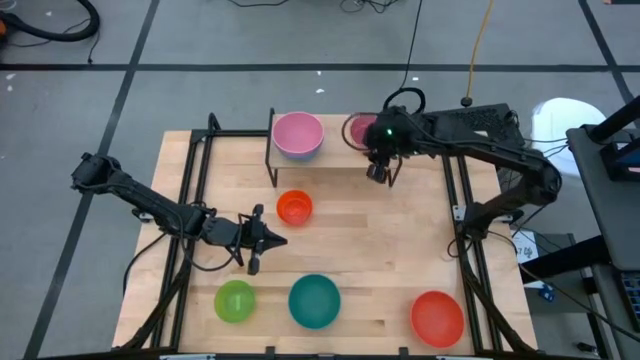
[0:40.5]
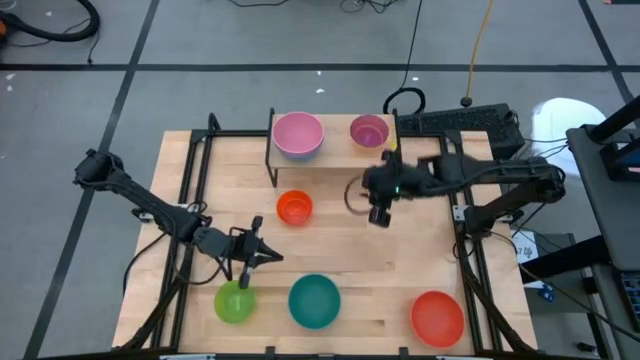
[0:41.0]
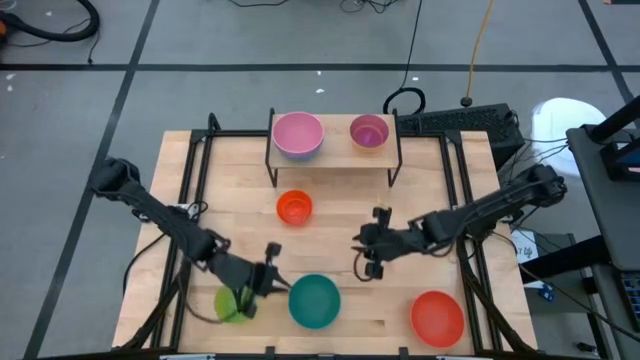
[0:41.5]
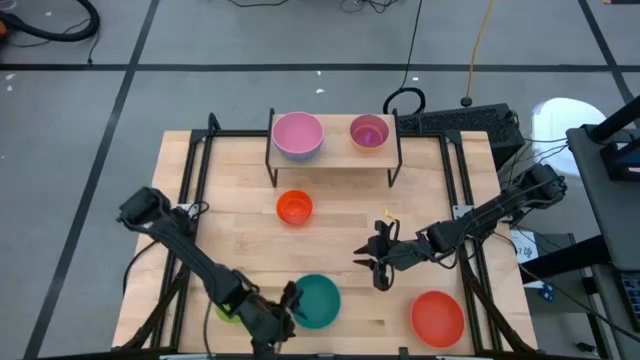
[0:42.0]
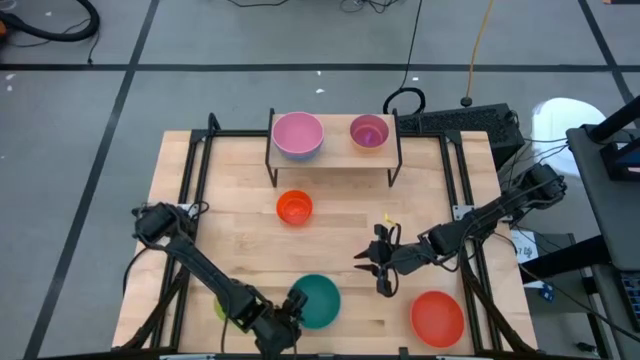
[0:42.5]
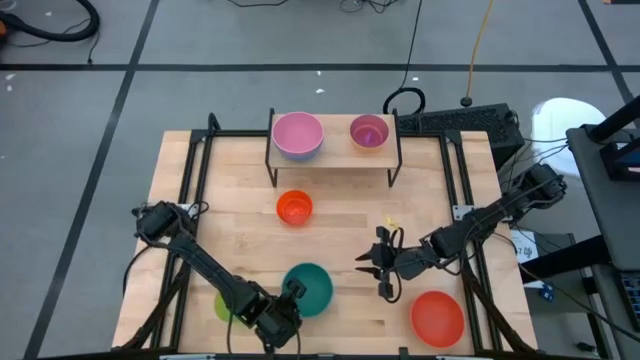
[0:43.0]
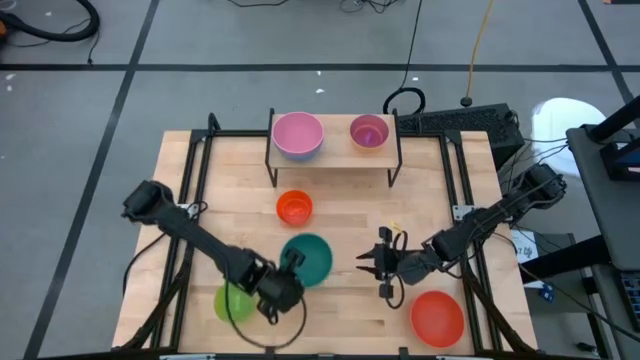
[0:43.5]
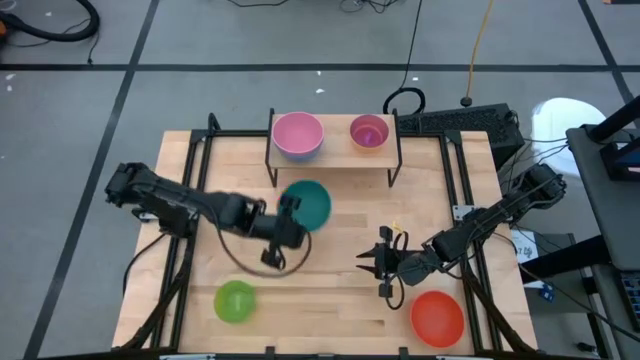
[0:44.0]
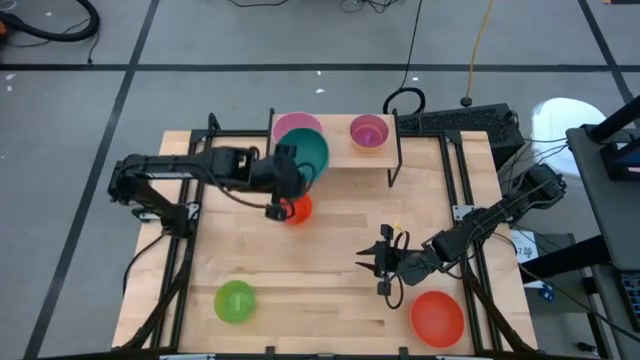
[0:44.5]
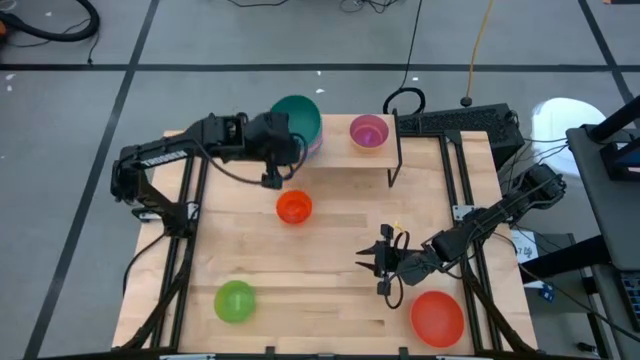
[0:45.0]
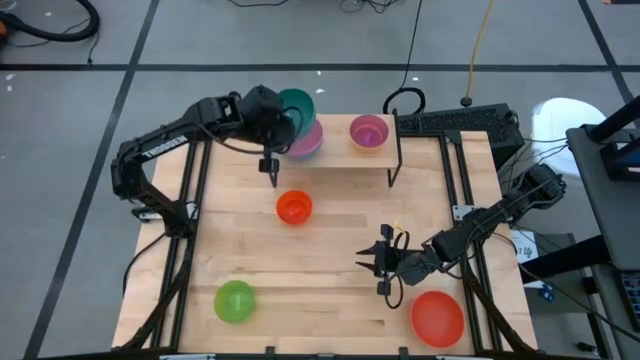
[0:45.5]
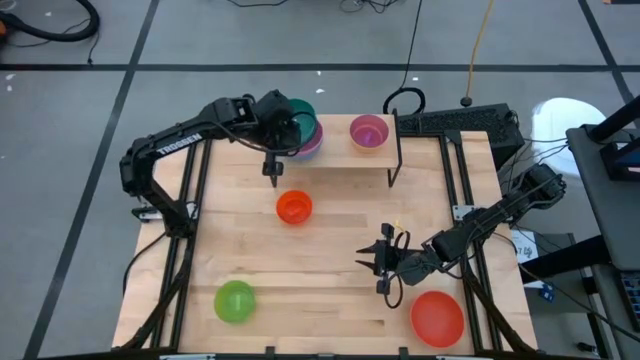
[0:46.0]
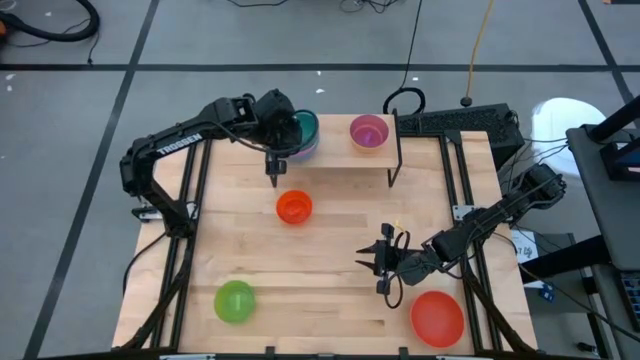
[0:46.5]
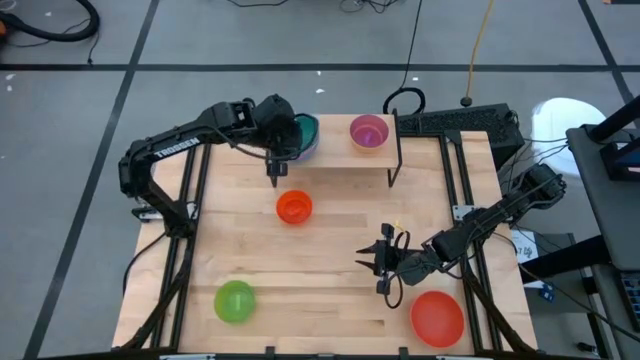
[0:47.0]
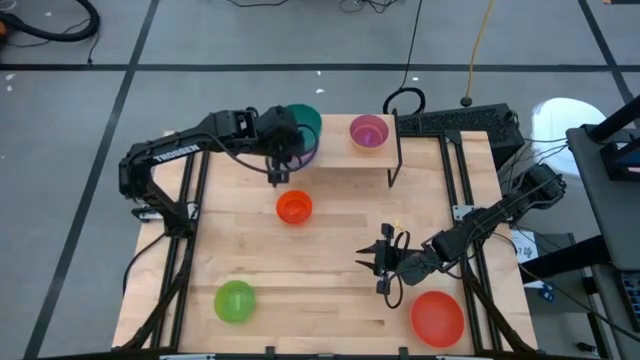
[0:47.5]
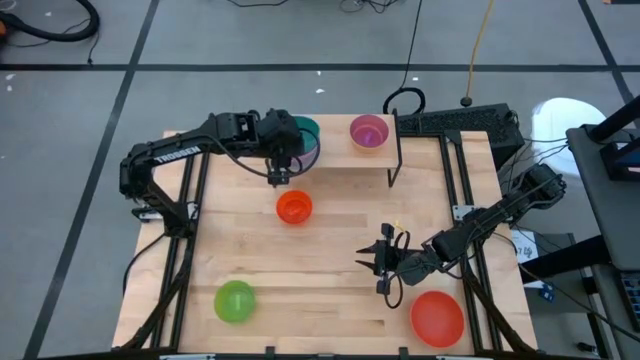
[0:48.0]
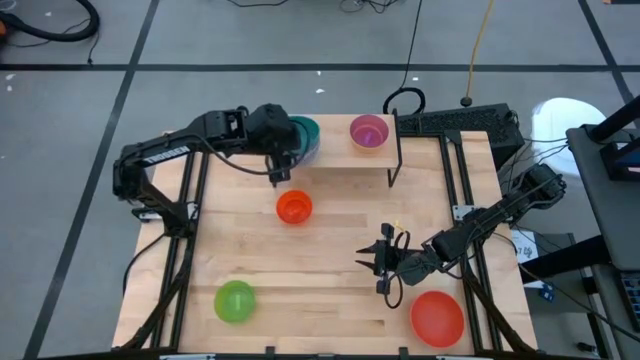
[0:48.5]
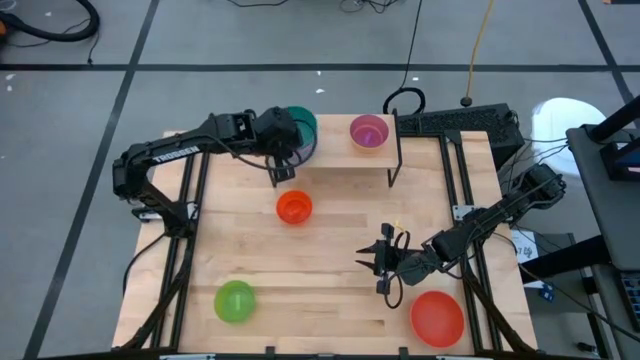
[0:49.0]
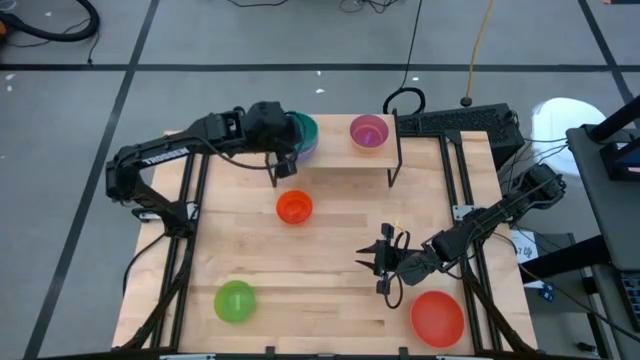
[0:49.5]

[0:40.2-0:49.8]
Task: Place and stack bowls onto a shelf
Stack the green bowl on top of the pink bowl on the shelf

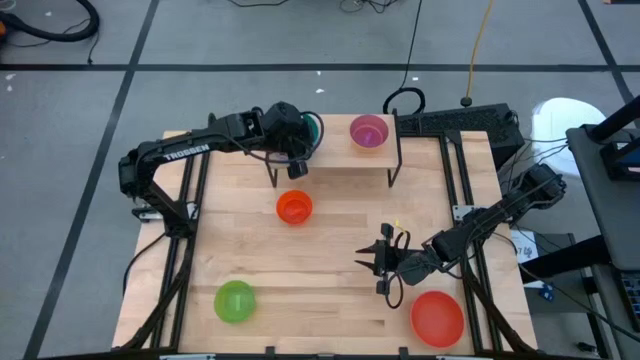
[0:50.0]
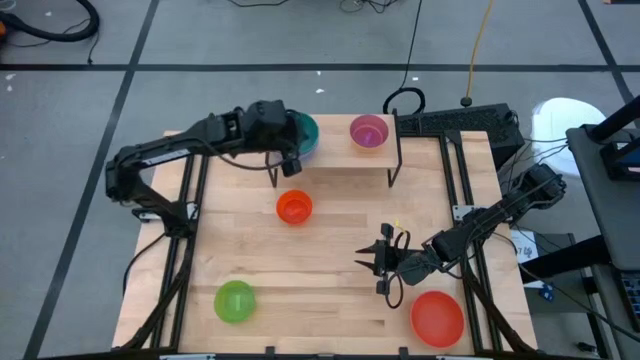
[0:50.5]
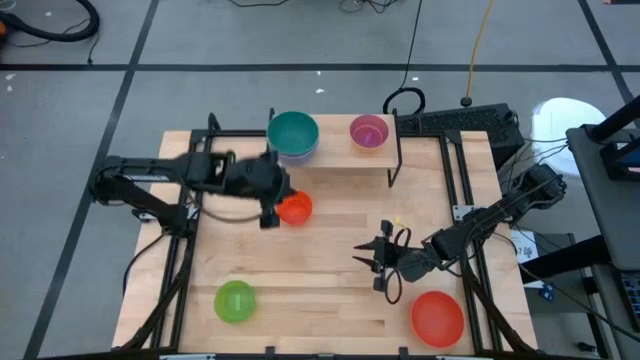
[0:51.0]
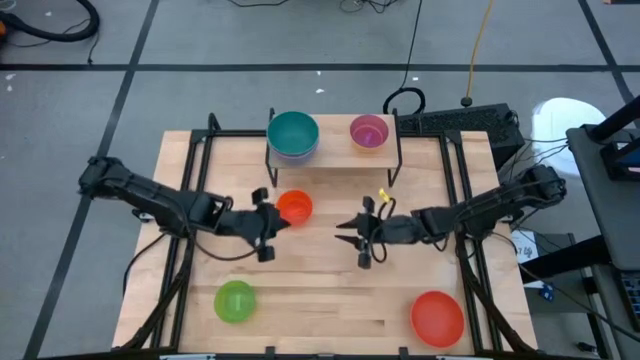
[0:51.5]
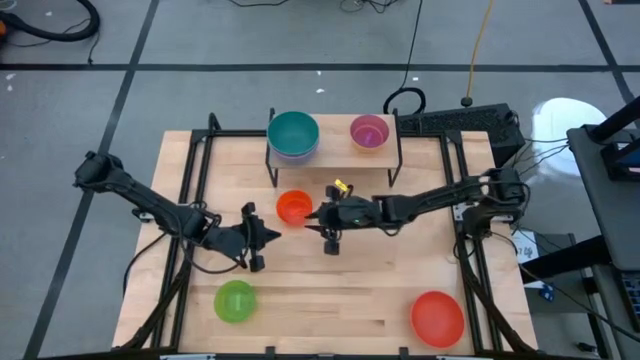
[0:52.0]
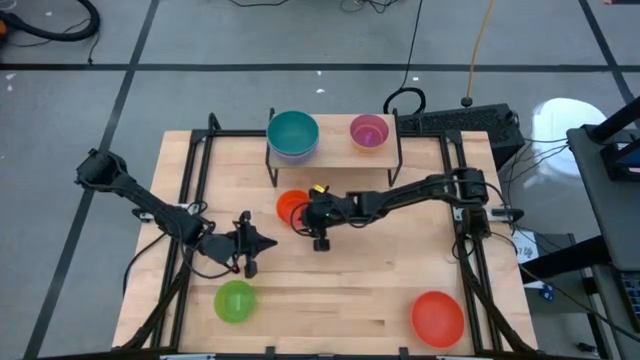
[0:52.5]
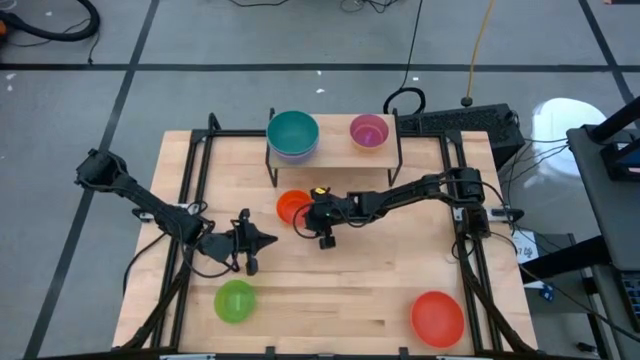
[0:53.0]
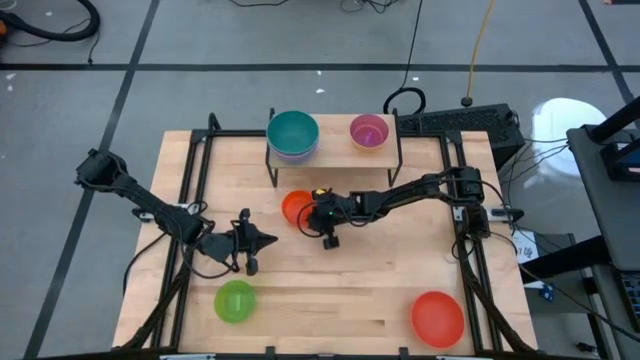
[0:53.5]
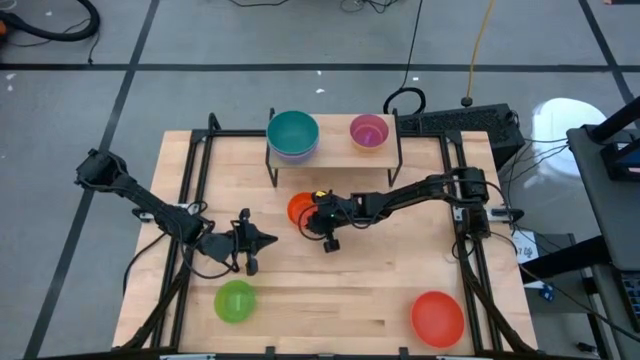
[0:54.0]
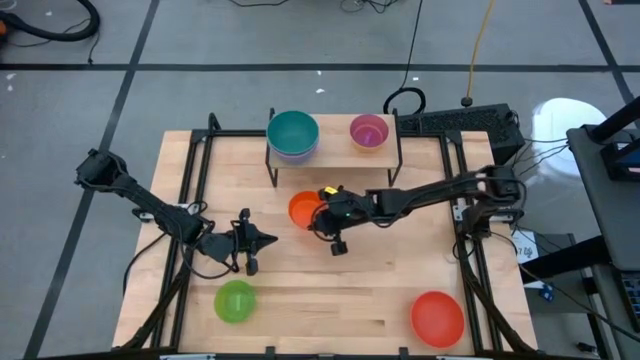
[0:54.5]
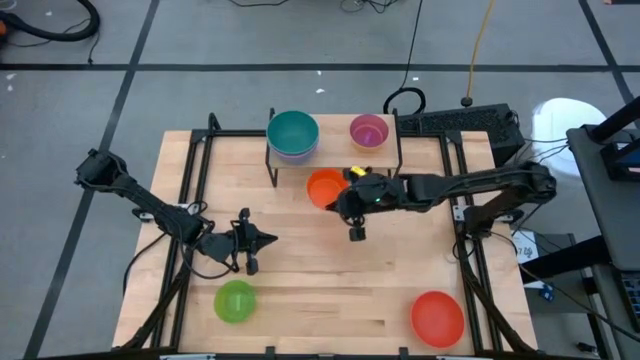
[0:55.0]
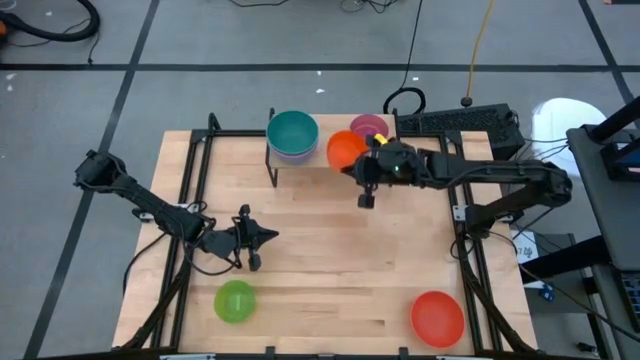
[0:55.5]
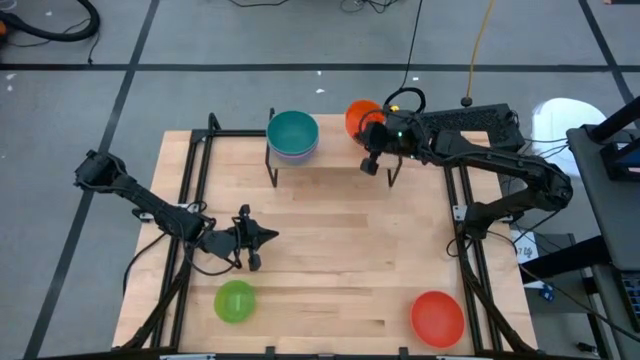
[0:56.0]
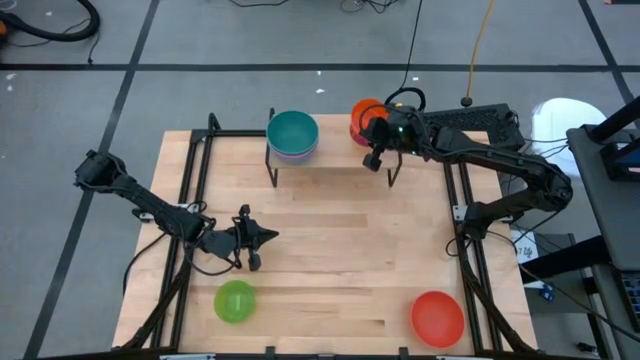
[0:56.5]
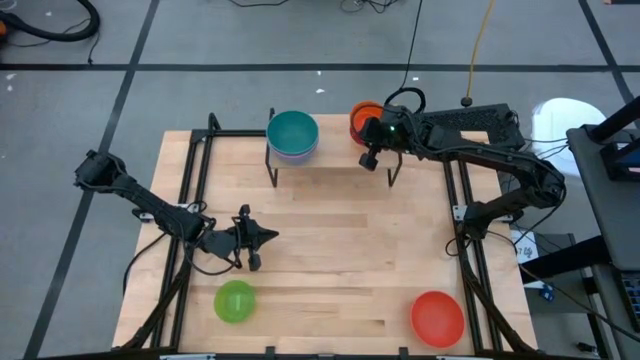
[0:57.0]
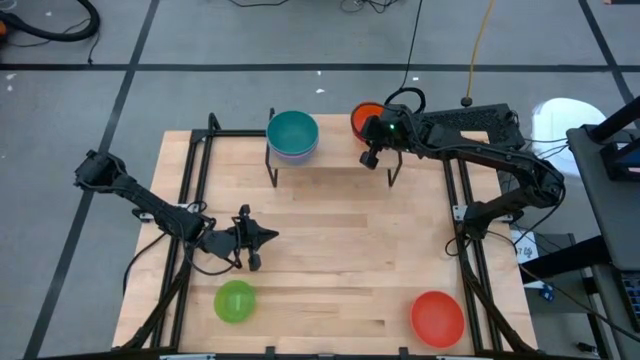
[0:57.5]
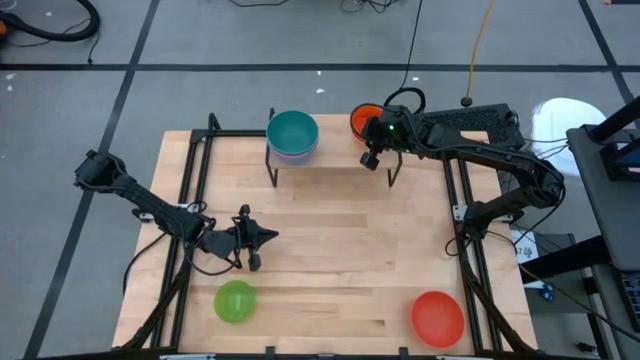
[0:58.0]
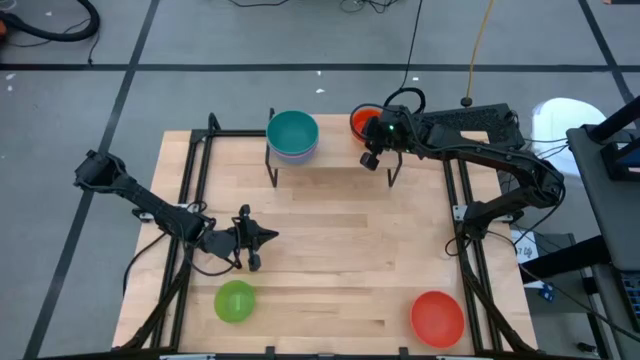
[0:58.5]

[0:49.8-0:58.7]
Stack the top orange bowl on top of the purple bowl on the shelf

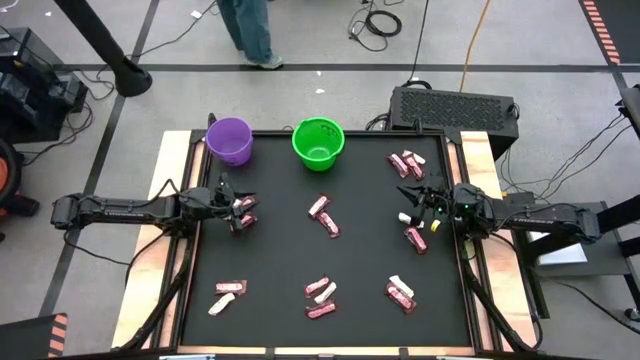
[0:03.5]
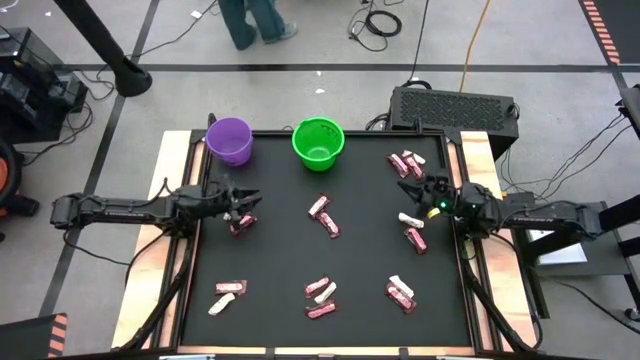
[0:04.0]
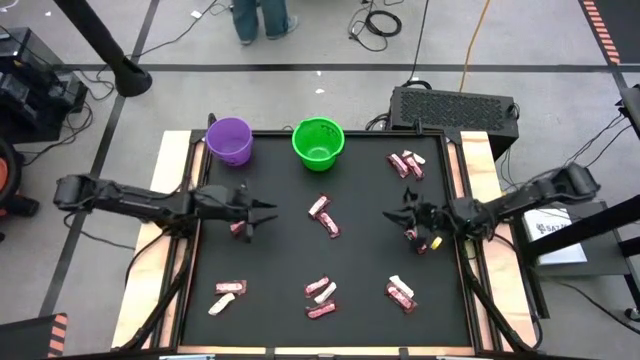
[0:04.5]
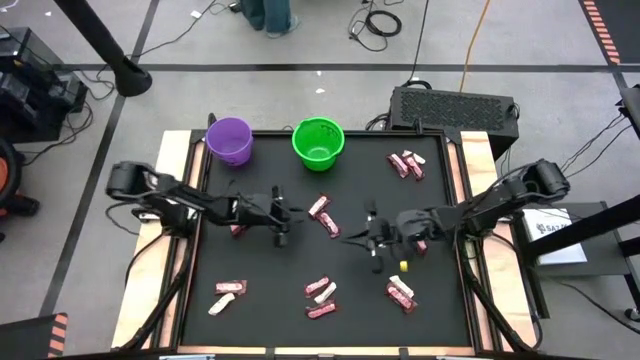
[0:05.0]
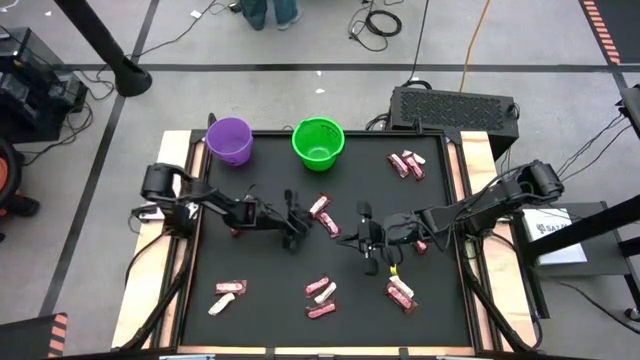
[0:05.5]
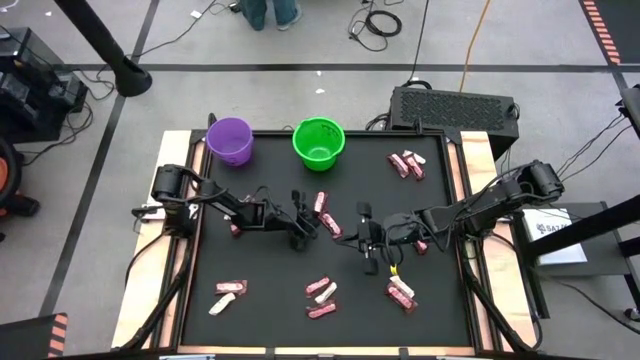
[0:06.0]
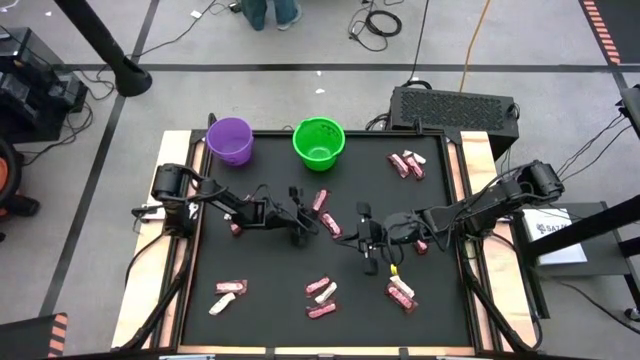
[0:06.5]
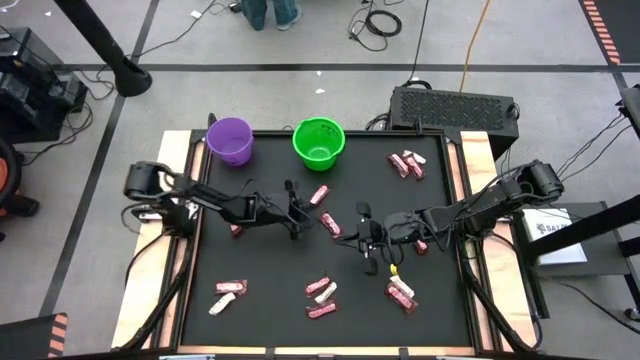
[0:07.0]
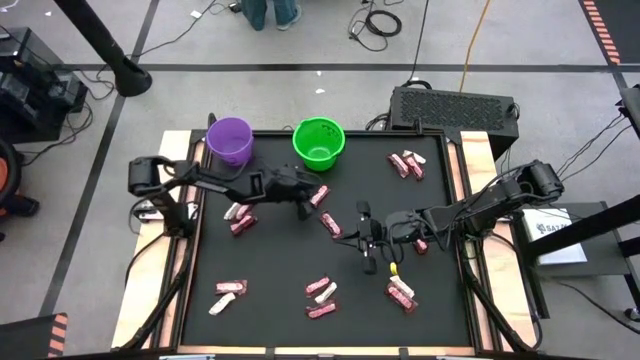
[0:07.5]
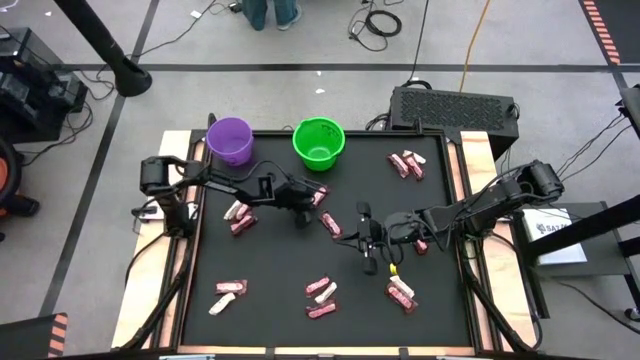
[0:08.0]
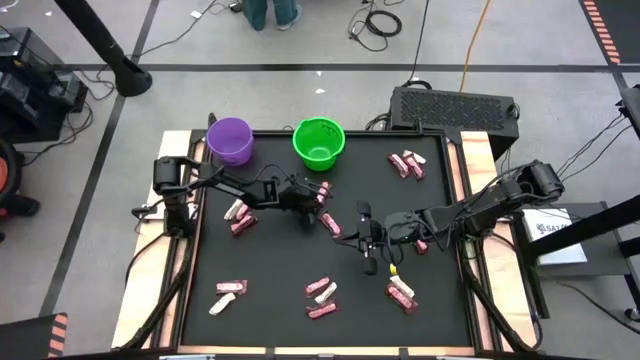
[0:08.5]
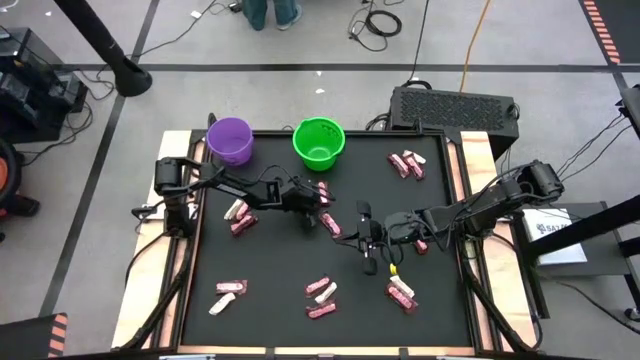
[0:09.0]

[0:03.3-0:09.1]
Task: Sort candy by brand, put in halloween buckets
Put the brown chocolate bar into the purple bucket
